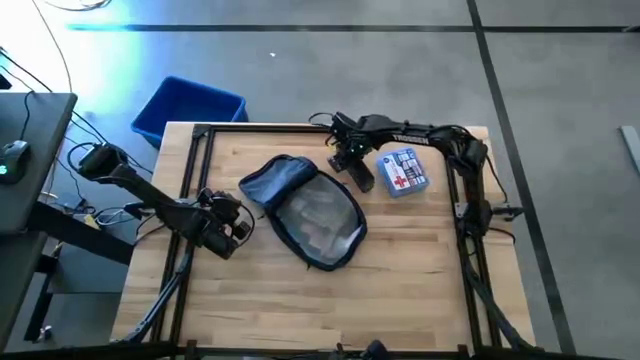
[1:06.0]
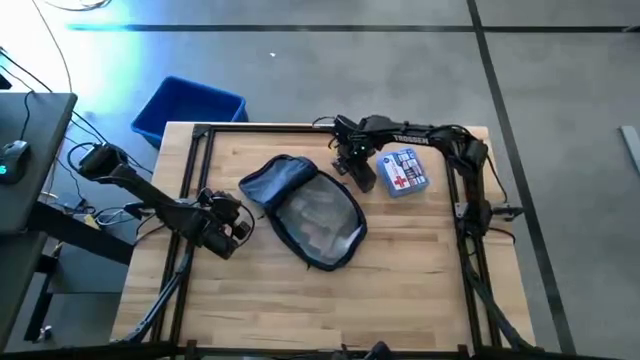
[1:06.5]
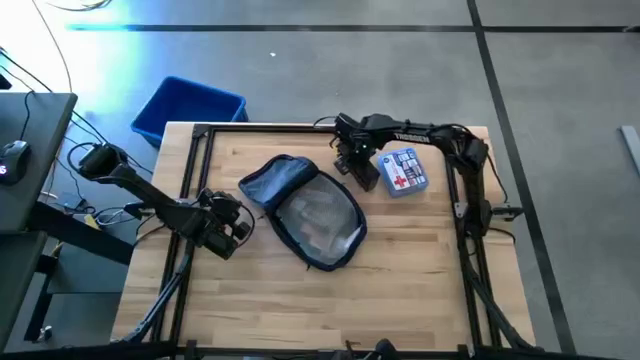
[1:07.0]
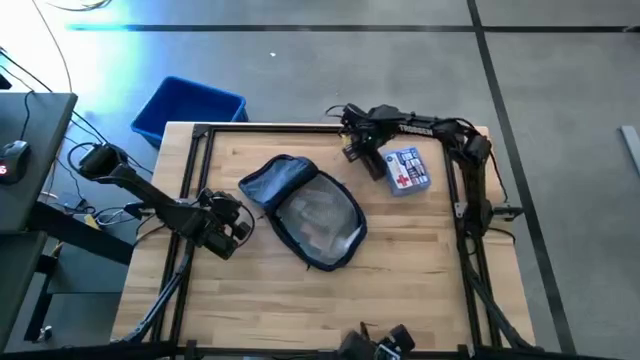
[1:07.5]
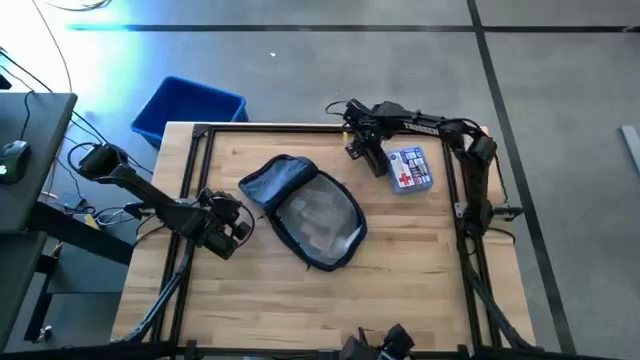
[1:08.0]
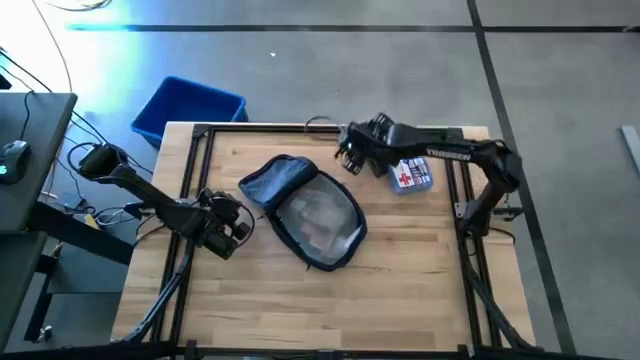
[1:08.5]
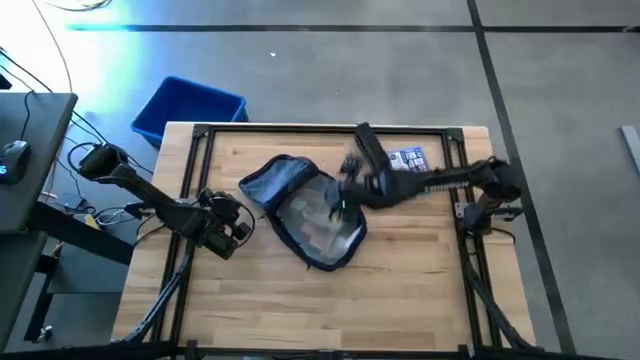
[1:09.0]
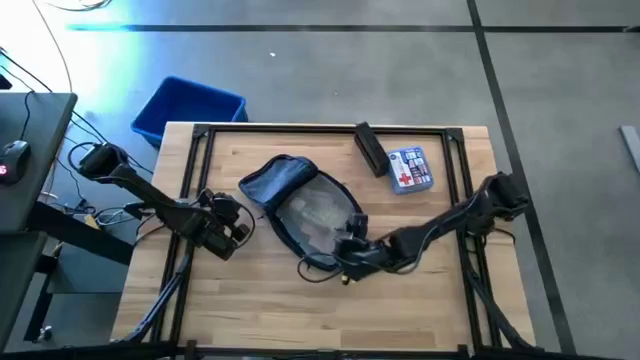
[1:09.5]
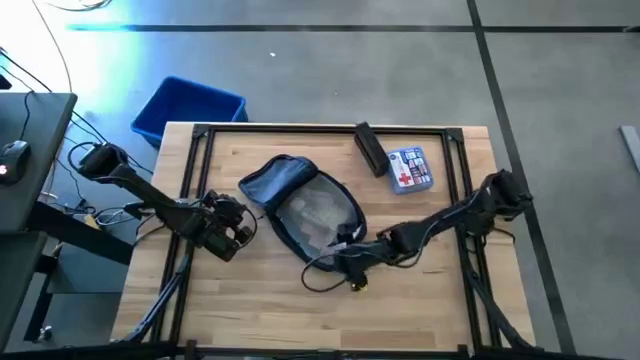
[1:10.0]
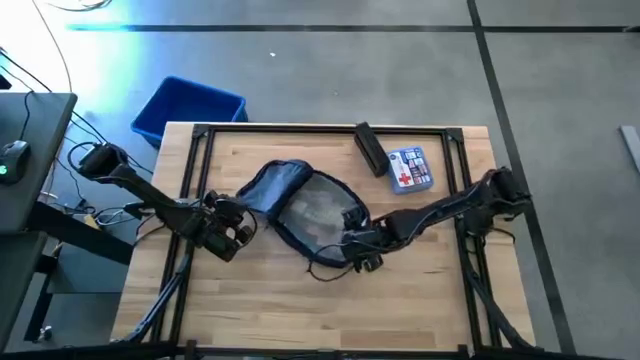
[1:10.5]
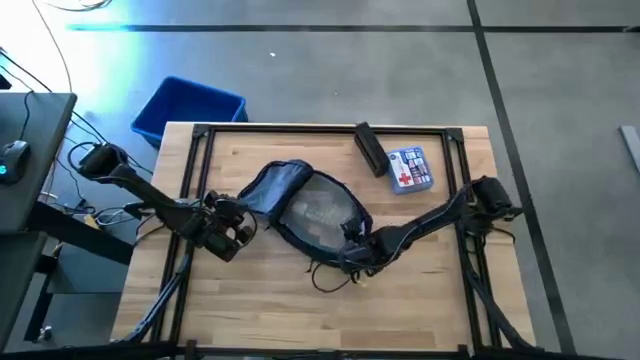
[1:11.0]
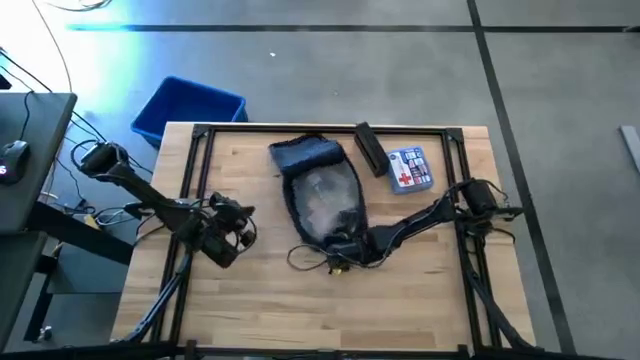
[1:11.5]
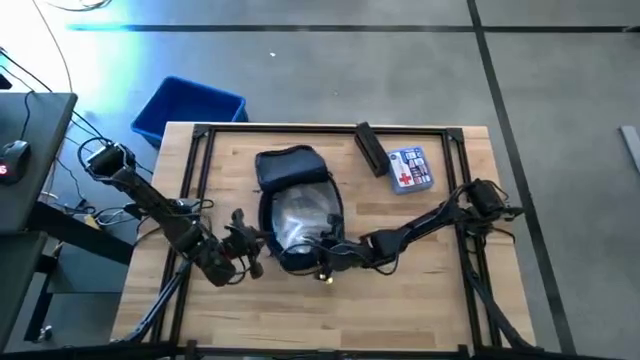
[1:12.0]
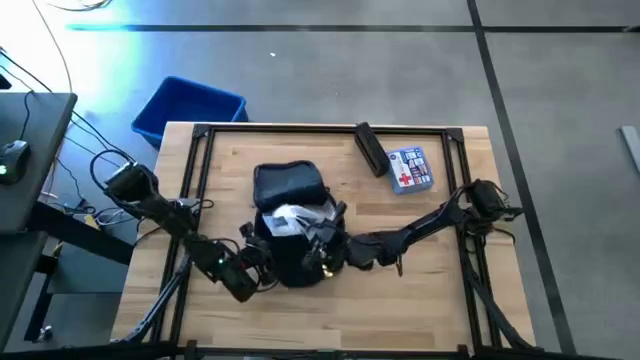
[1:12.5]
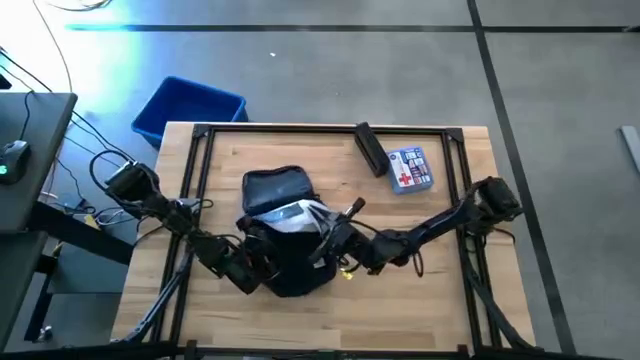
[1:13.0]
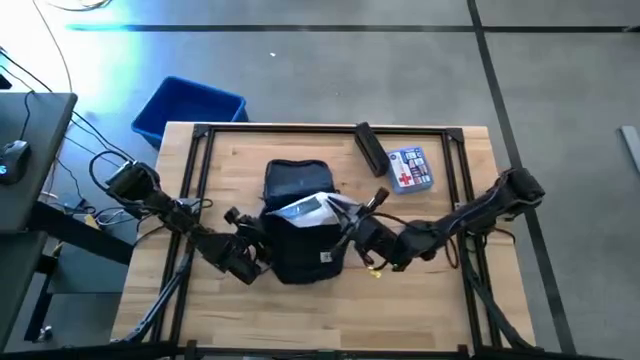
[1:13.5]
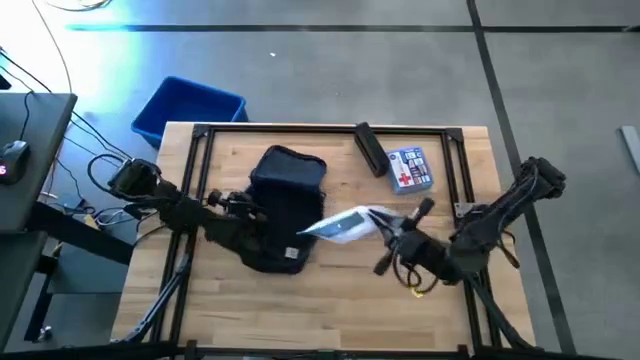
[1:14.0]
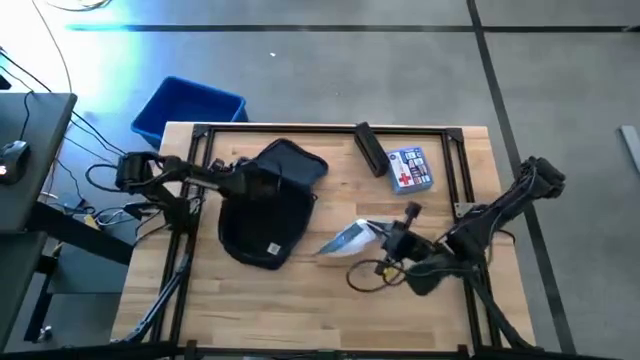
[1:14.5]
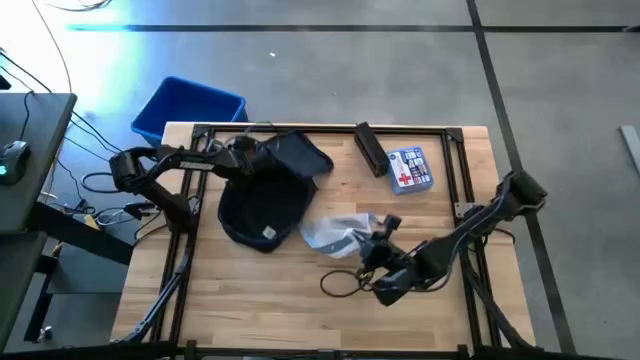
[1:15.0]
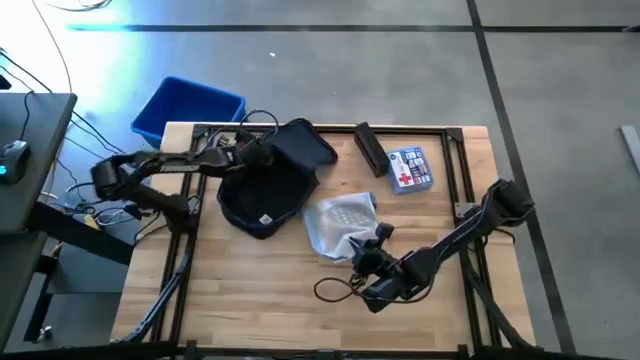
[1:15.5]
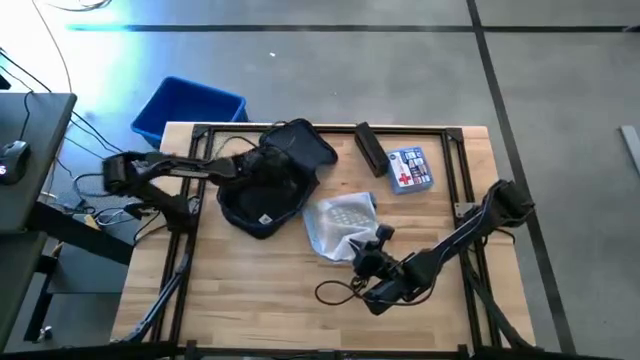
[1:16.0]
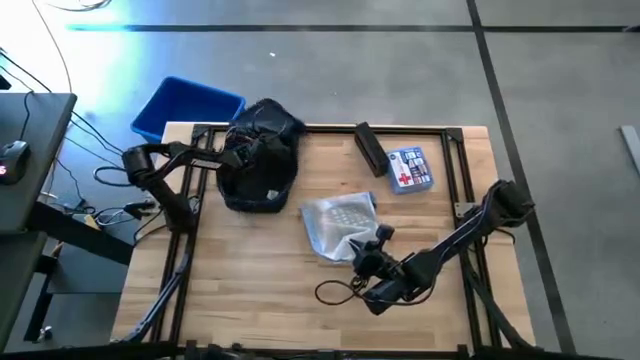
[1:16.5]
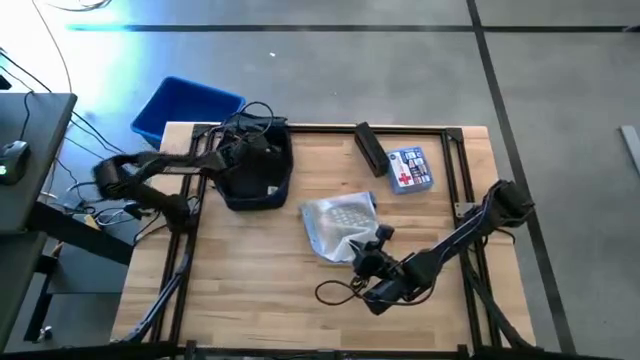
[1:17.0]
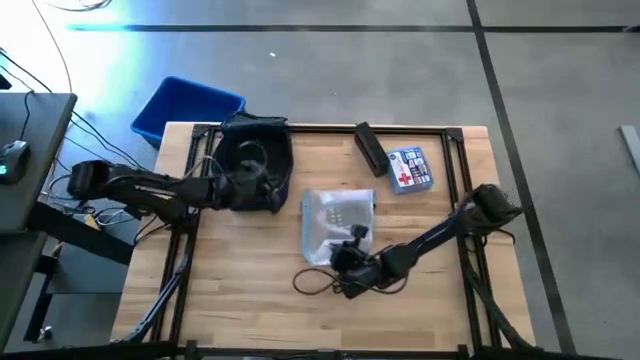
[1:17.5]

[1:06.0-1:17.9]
Task: Unpack backpack
Remove the white zip bag from the backpack

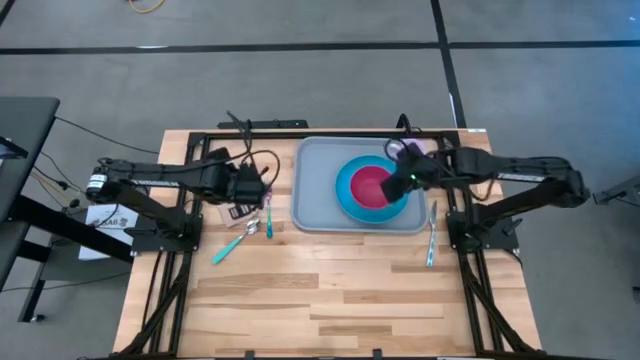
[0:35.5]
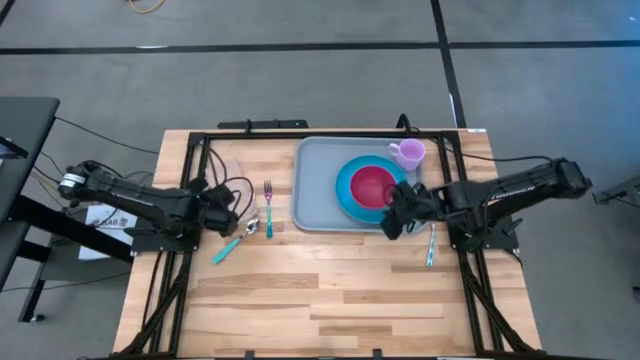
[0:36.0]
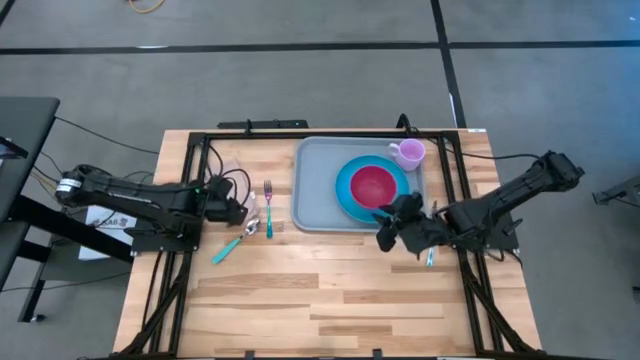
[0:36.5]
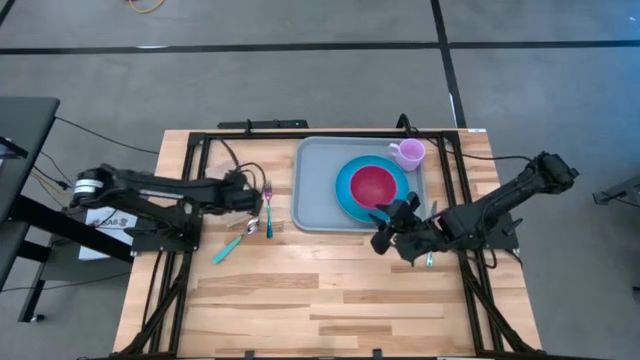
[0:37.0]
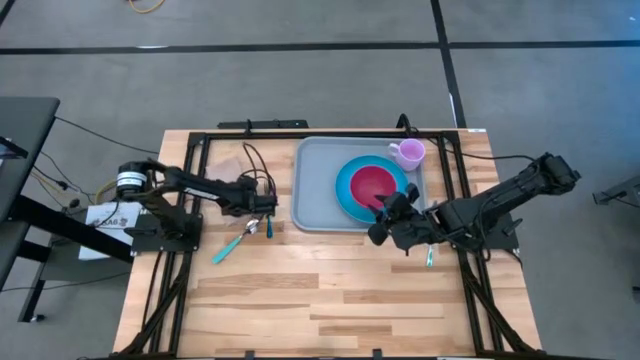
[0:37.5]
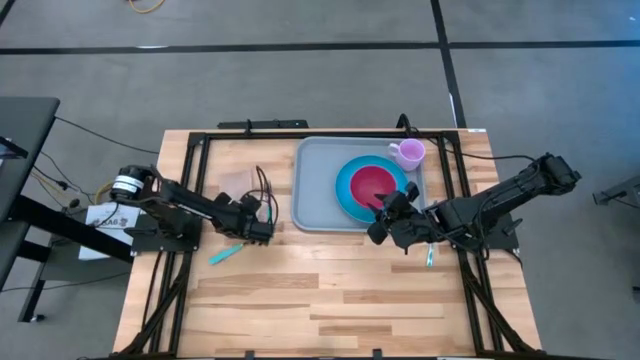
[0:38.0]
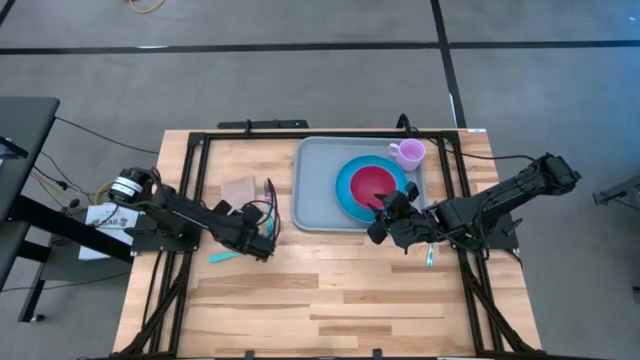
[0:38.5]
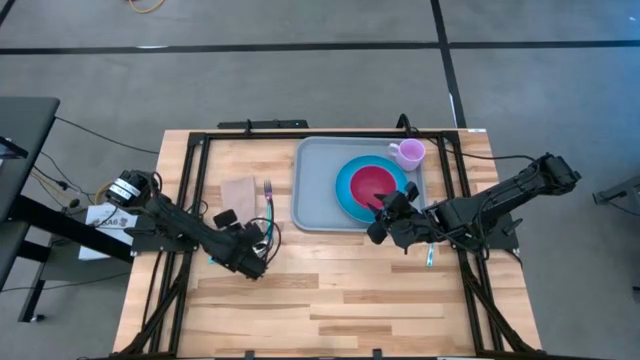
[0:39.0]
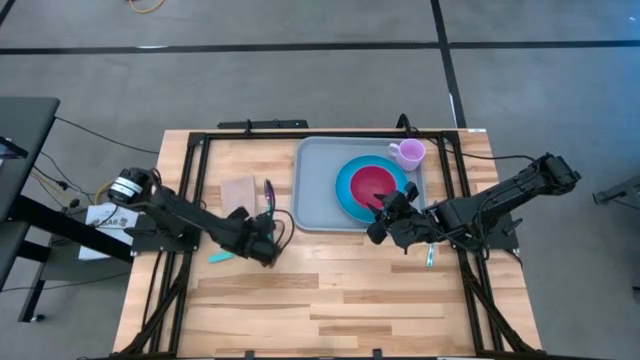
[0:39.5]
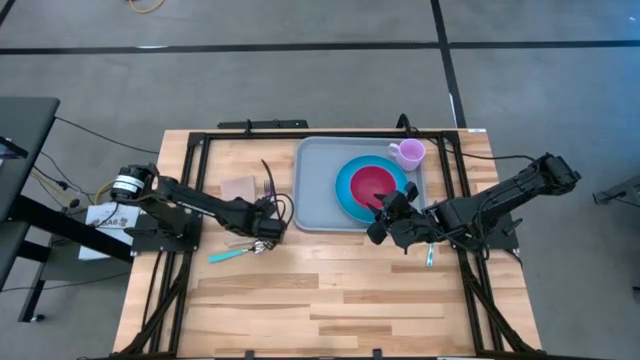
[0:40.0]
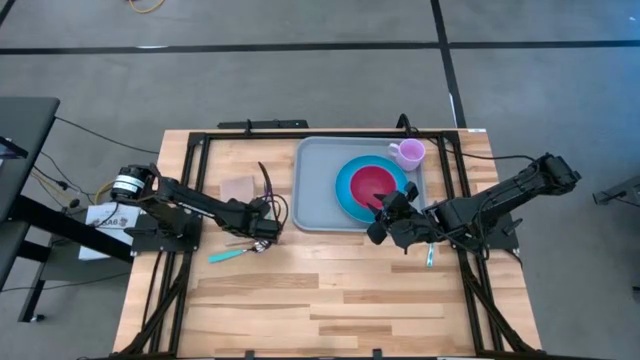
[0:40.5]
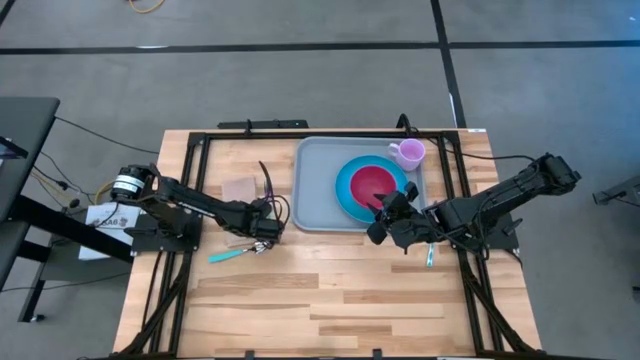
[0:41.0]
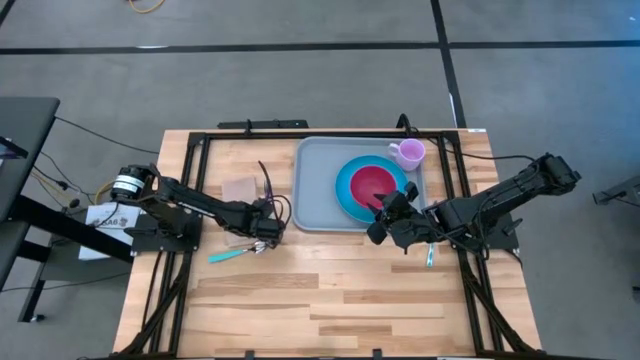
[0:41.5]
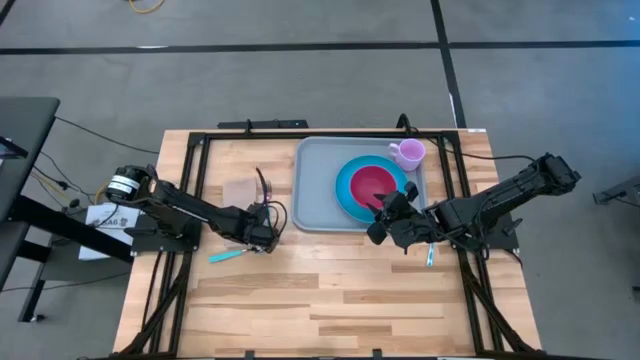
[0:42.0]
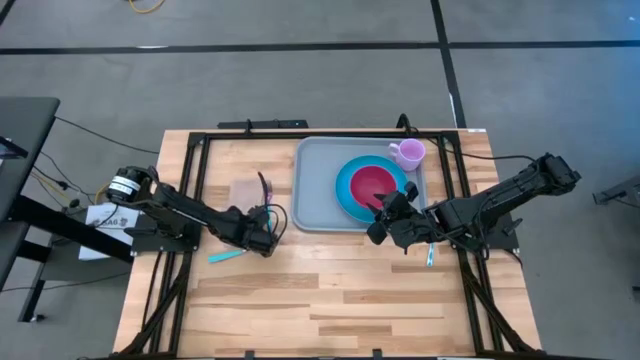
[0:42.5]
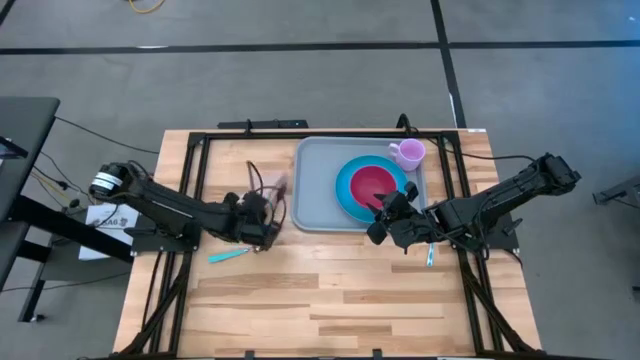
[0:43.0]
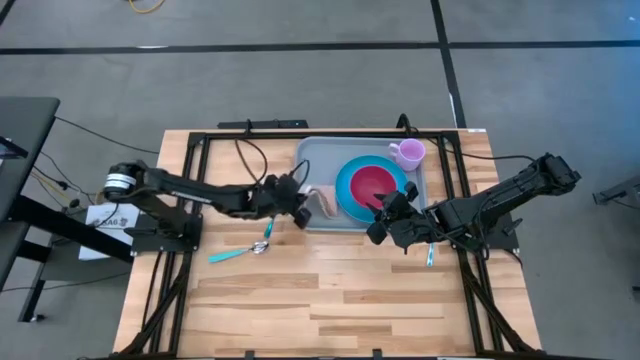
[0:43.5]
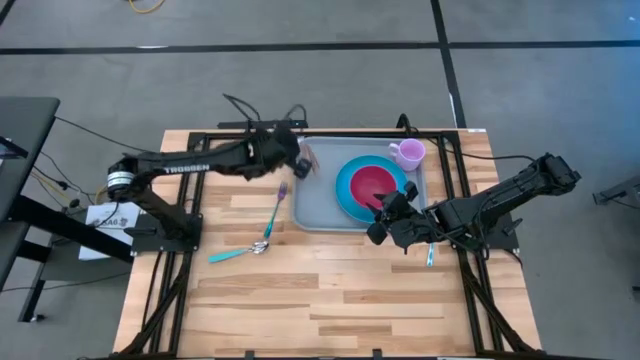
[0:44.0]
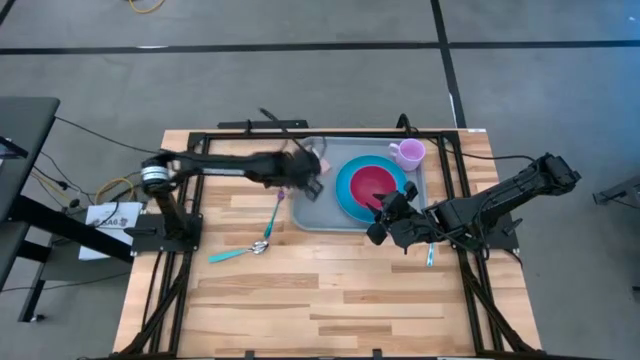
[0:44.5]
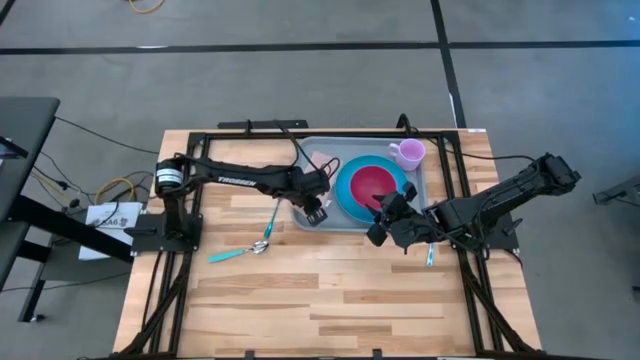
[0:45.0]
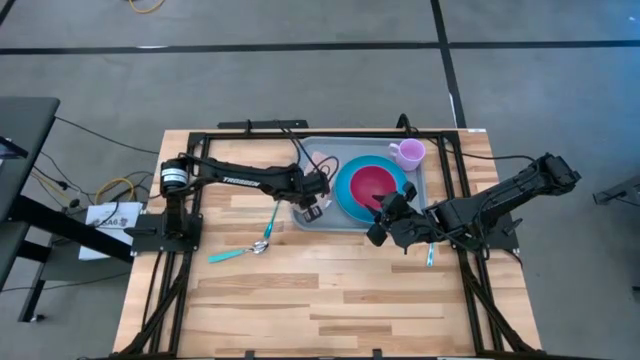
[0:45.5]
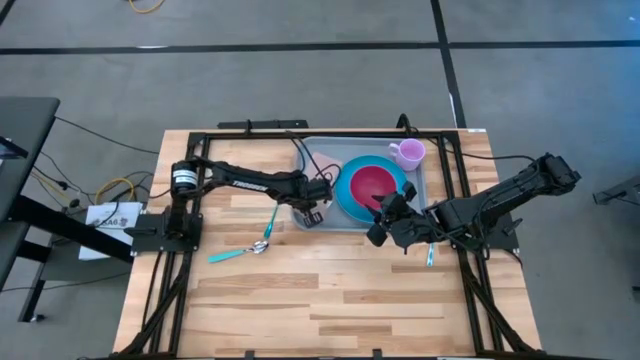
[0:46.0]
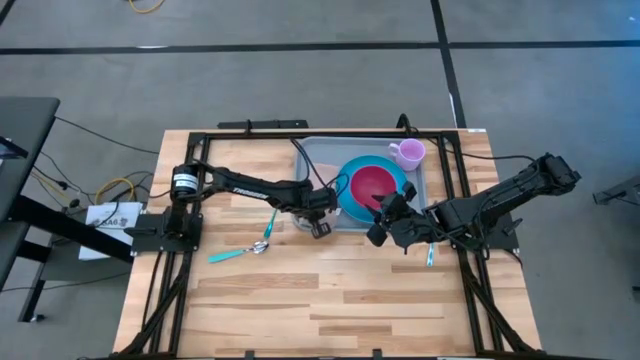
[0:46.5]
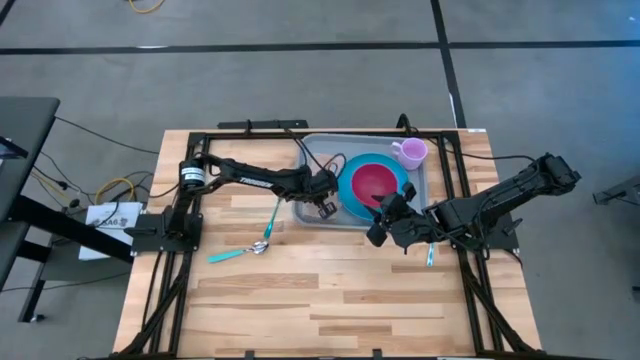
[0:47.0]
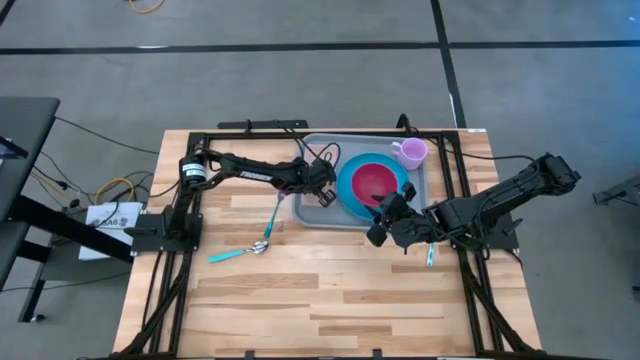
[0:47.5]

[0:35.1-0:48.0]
Task: Set up tray
Put the brown napkin on the gray serving tray to the left of the blue plate
